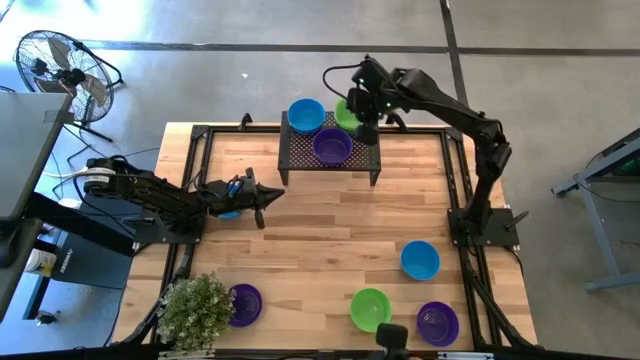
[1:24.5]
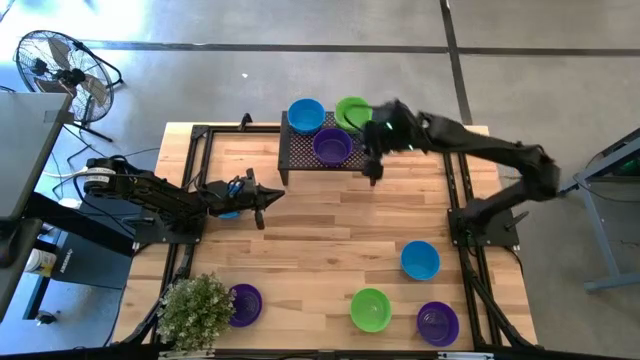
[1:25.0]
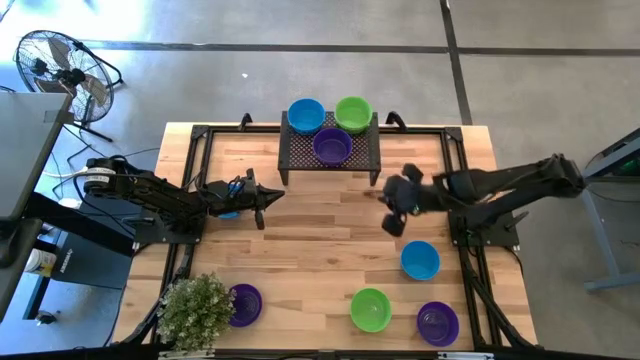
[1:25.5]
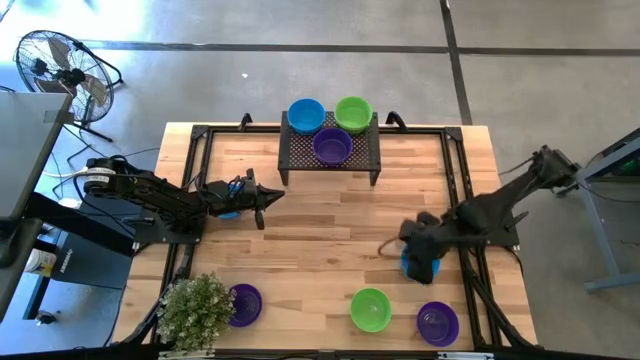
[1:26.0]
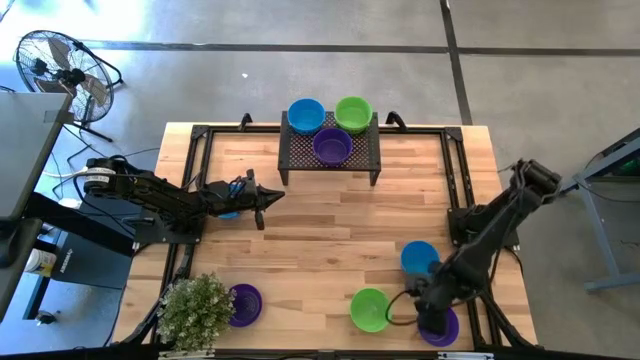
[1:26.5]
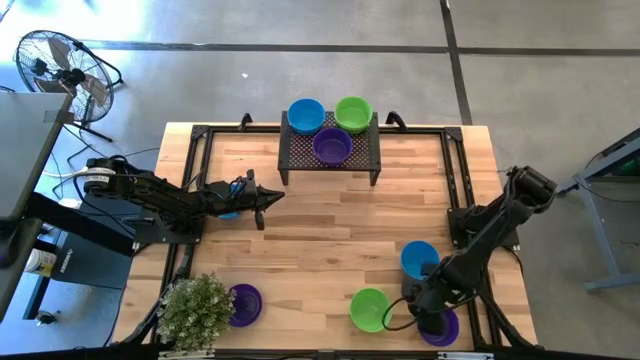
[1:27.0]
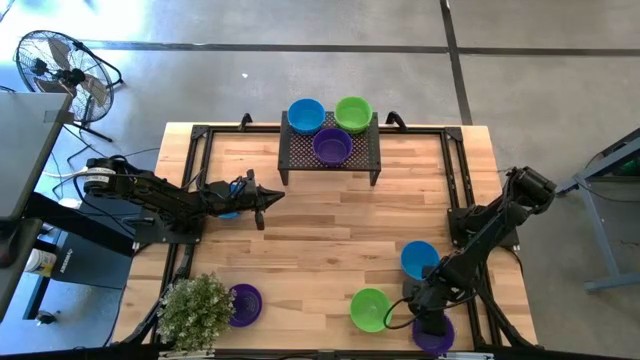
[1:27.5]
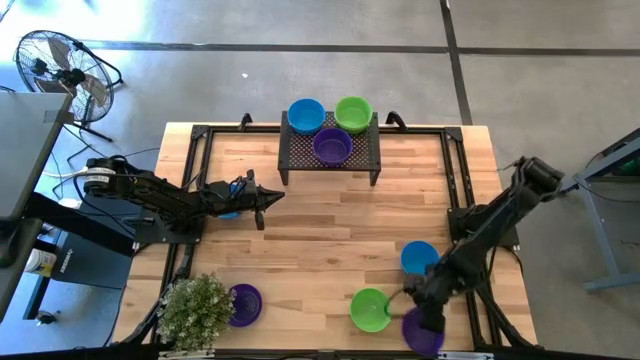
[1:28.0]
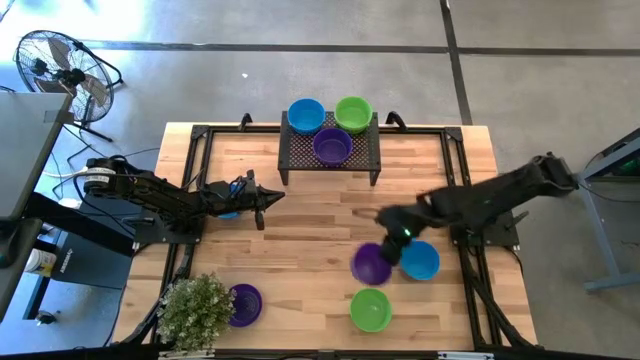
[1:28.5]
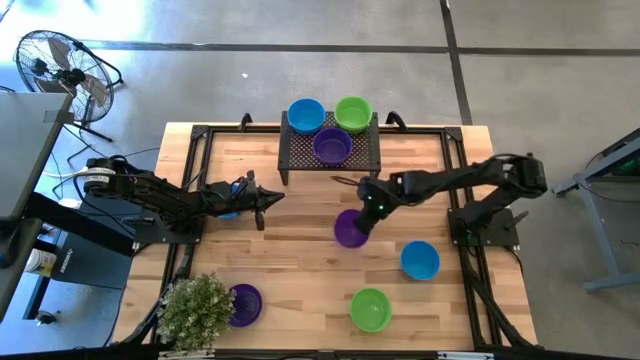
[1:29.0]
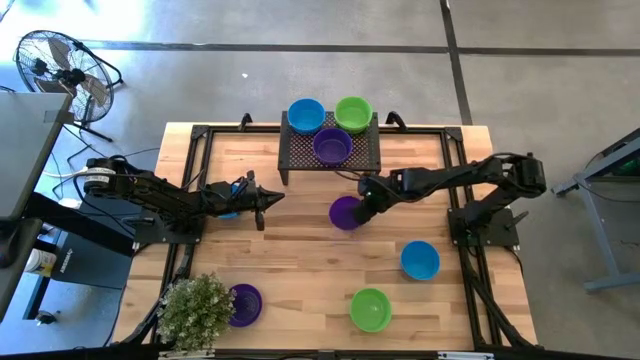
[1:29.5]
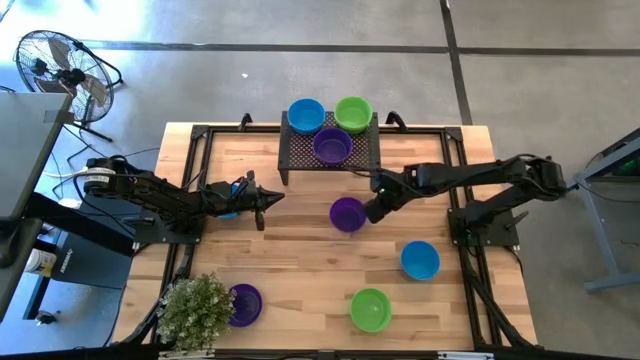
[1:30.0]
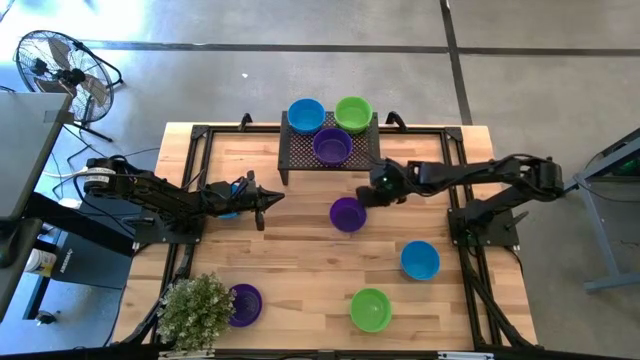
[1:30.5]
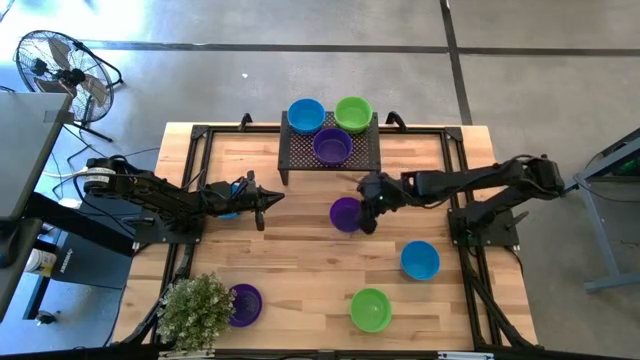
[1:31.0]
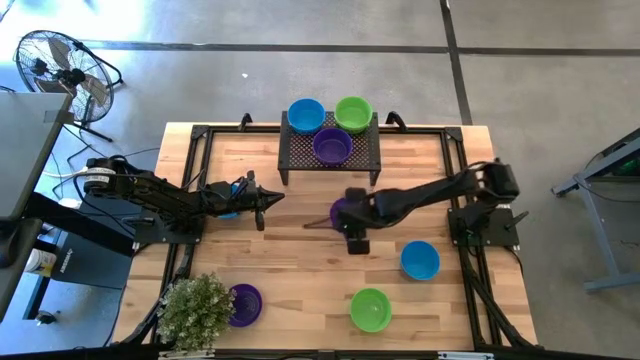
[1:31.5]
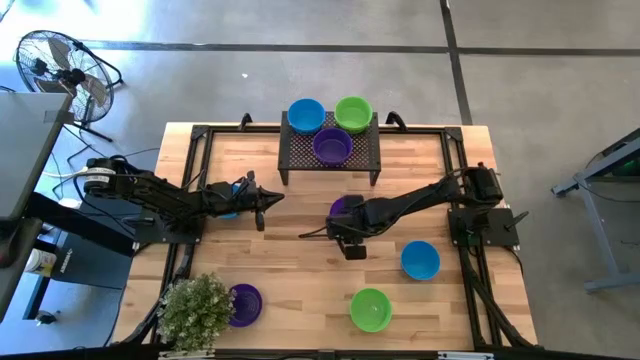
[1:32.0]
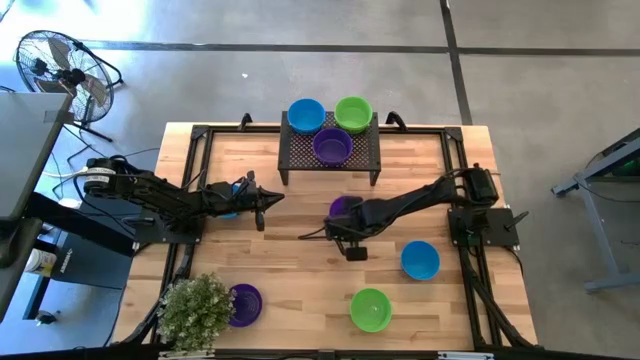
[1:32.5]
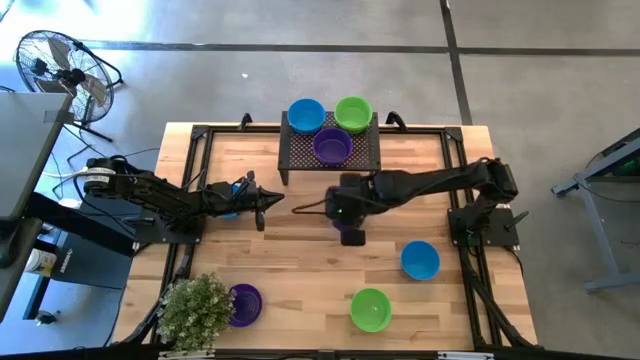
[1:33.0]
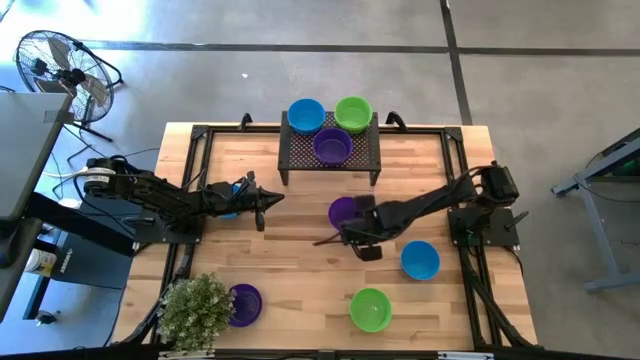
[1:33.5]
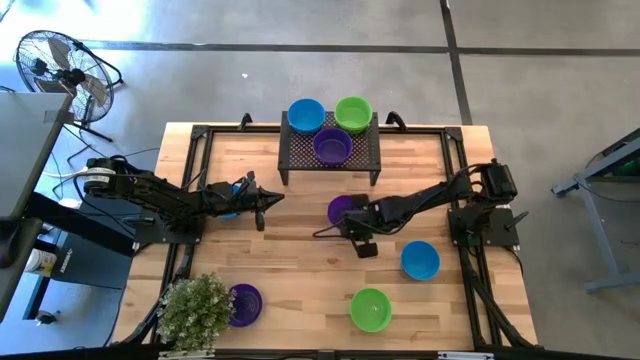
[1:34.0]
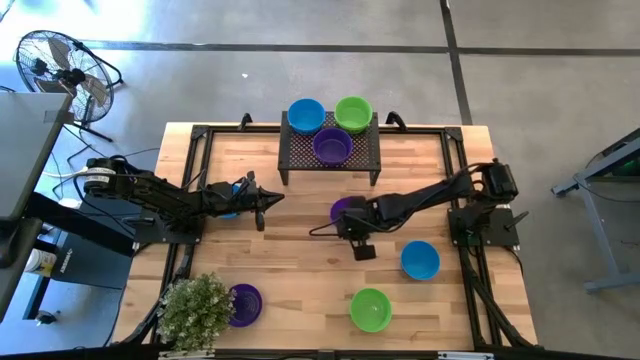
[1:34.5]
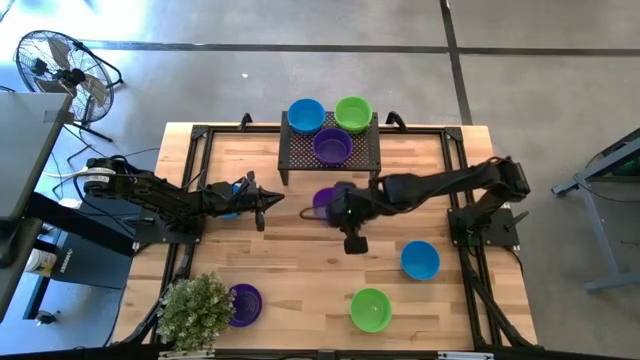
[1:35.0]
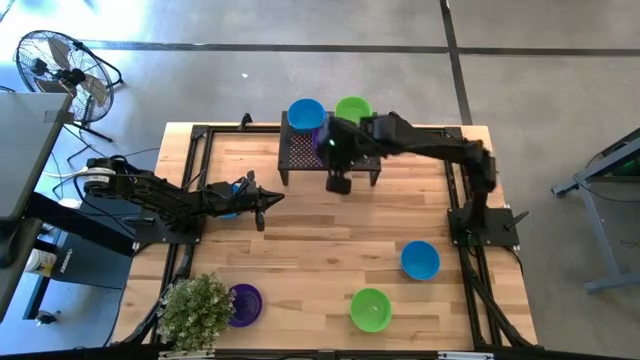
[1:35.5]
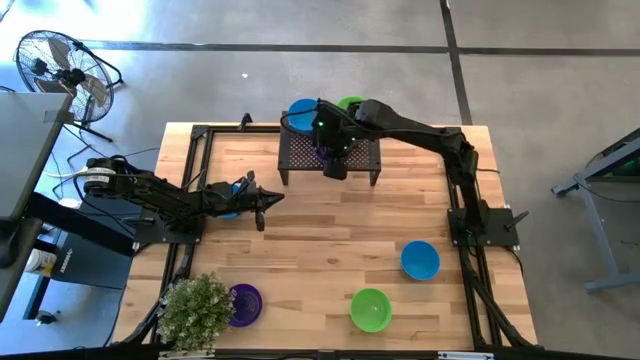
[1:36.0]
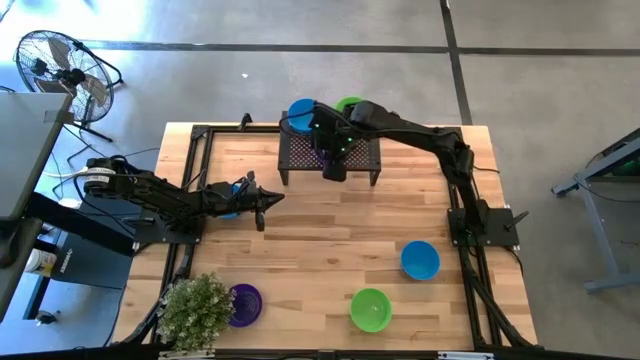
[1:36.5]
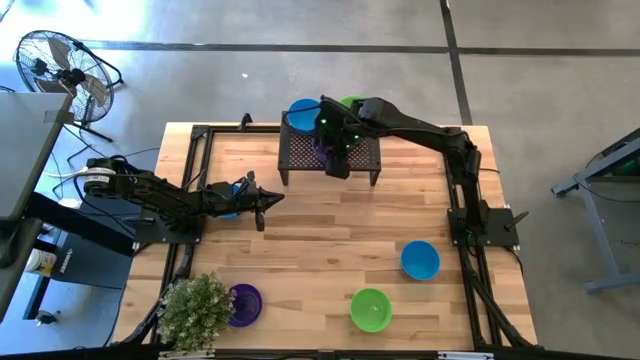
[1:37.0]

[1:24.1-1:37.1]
Task: Pick & Place Mini bowls
Stack the right violet bowl on the violet bowl on the shelf

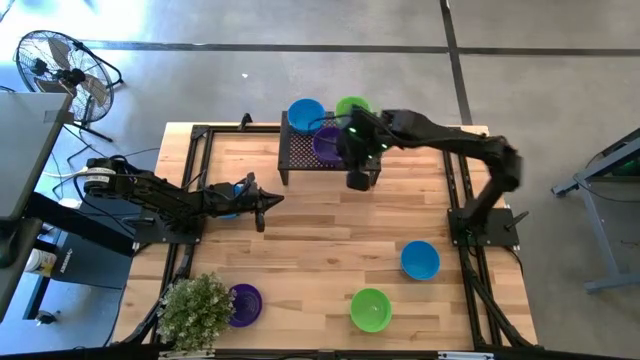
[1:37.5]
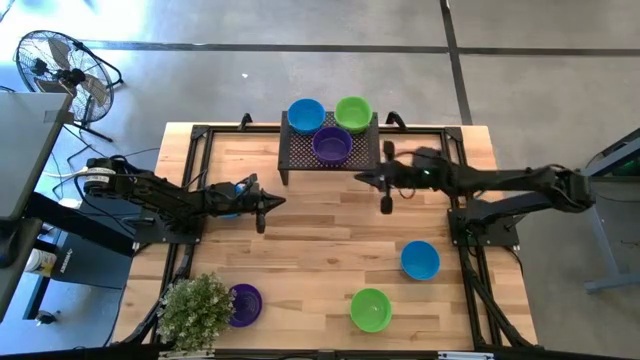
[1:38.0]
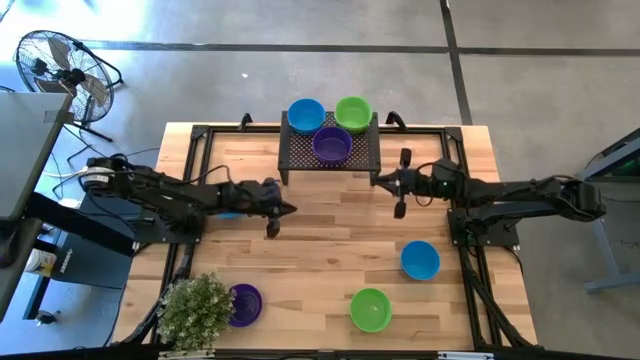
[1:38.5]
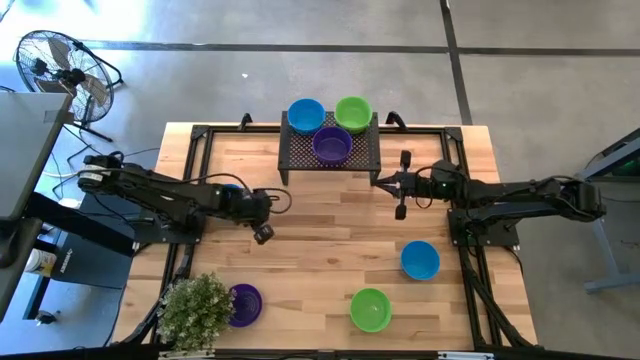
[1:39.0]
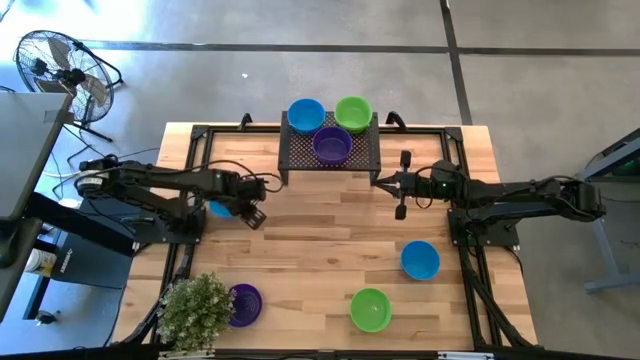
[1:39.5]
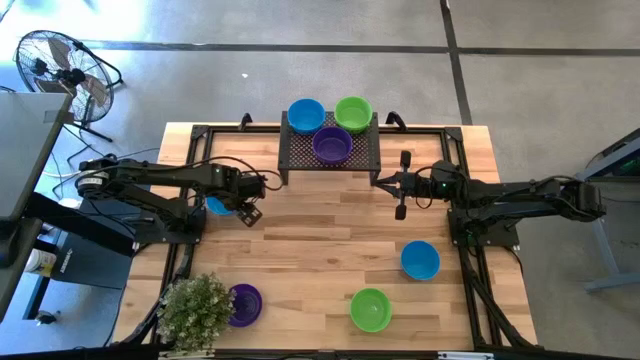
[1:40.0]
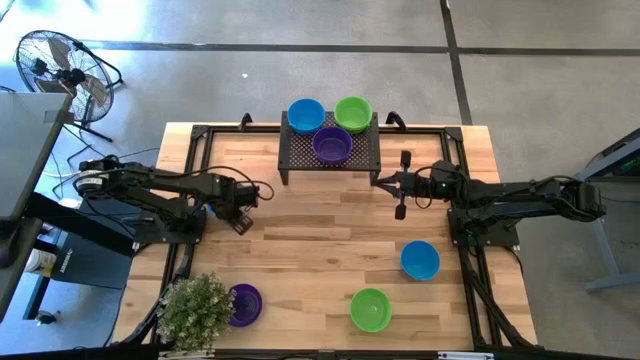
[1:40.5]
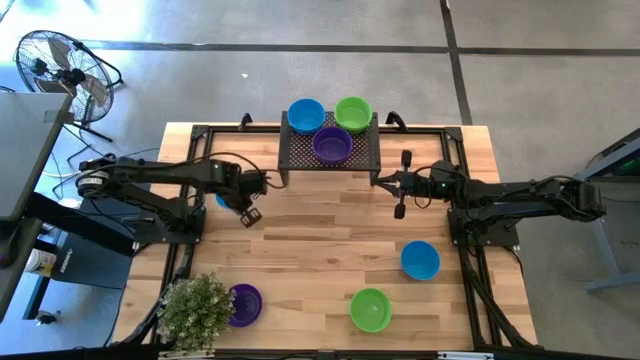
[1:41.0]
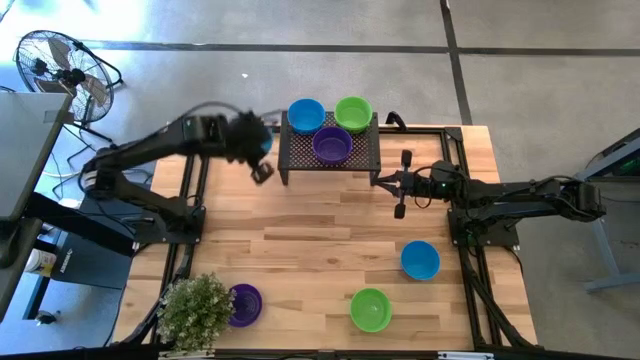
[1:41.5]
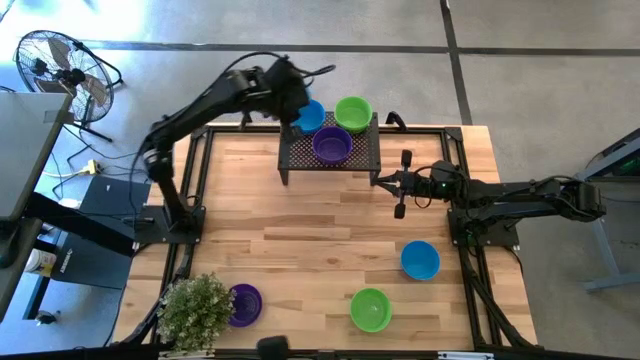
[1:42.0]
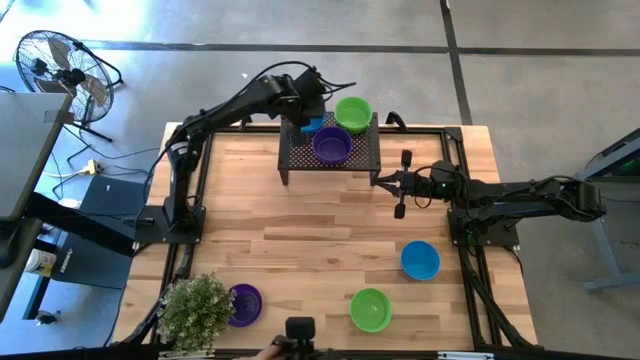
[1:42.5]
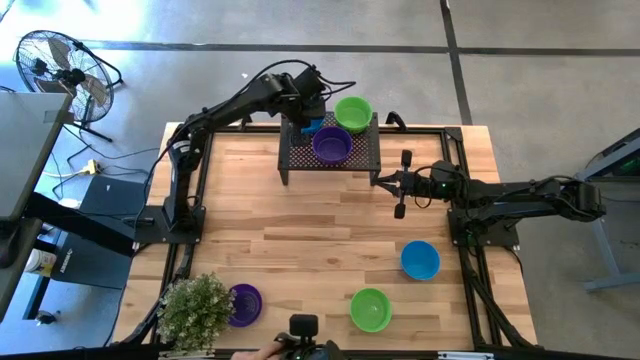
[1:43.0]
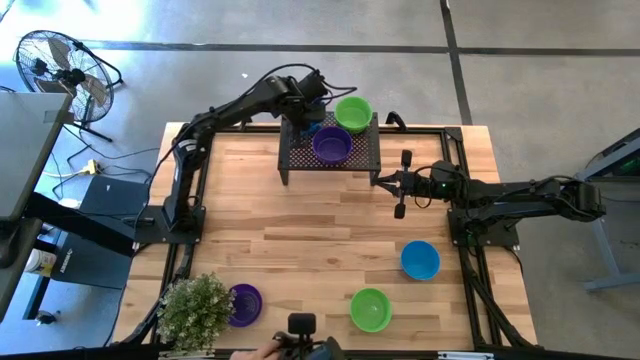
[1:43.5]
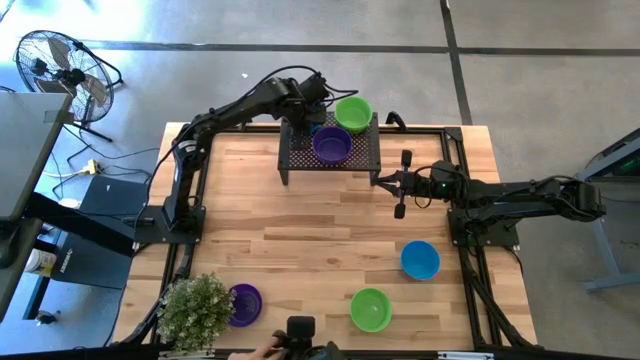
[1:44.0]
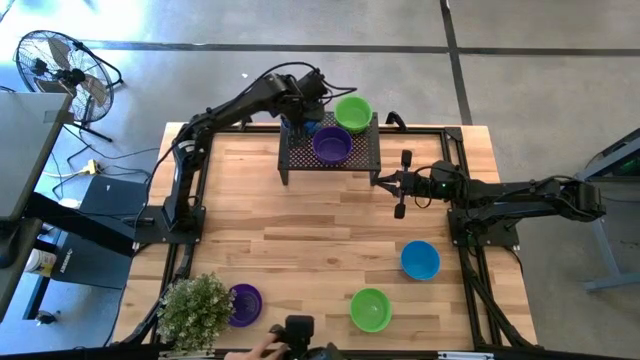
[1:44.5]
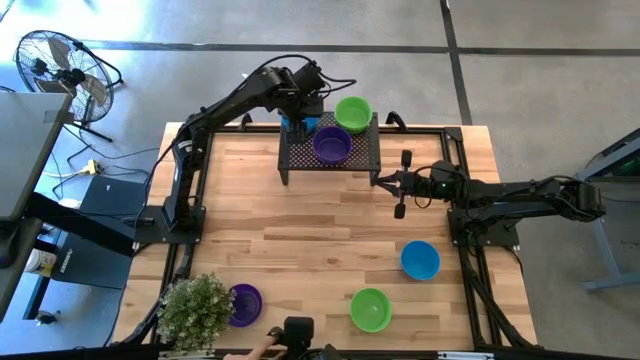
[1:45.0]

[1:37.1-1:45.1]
Stack the top blue bowl on the blue bowl on the shelf

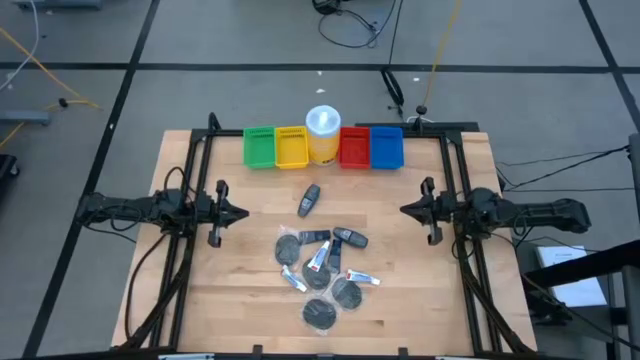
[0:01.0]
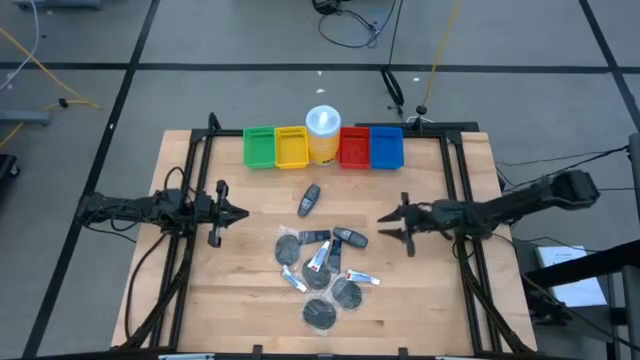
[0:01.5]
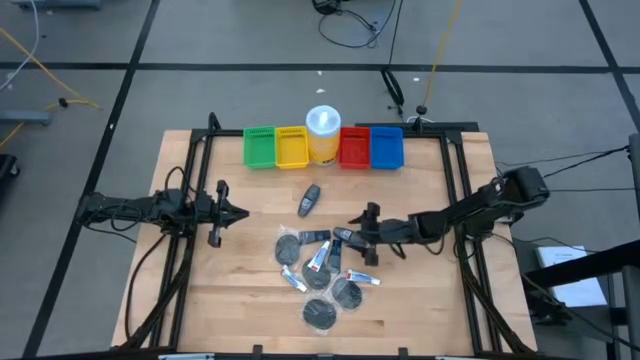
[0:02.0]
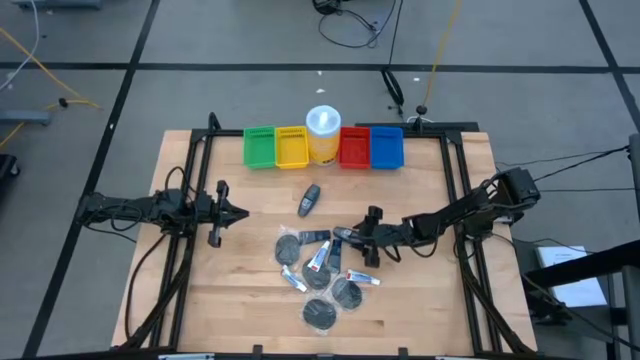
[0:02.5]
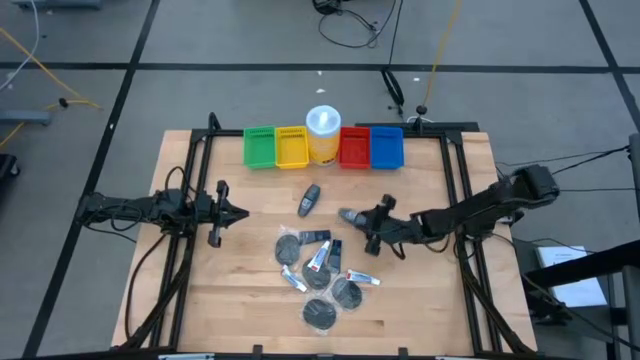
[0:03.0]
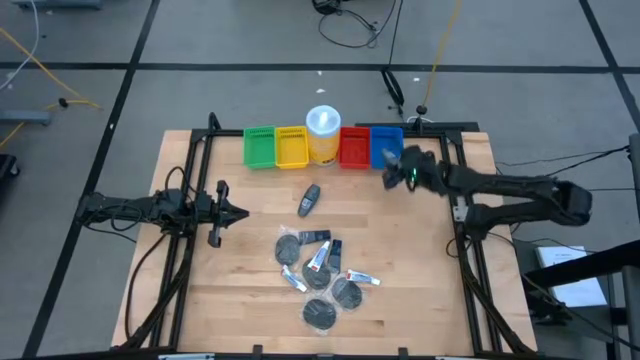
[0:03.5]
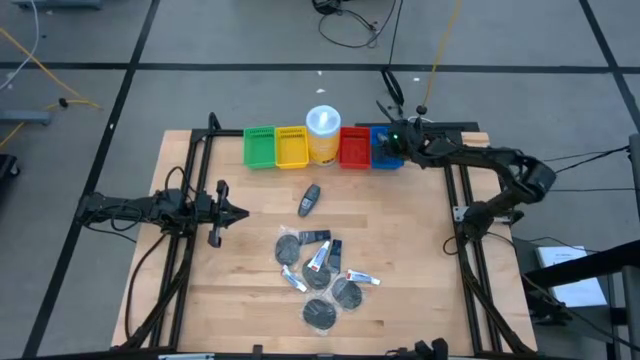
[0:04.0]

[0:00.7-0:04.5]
Task: Pick & Place Travel size toiletries
Put the black deodorant into the blue basket
